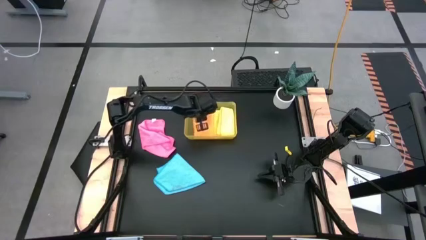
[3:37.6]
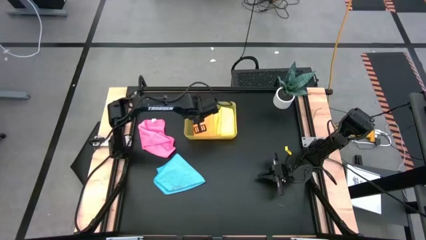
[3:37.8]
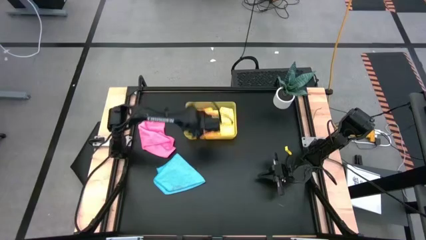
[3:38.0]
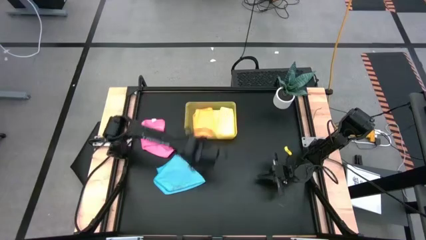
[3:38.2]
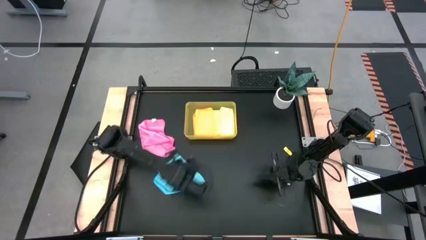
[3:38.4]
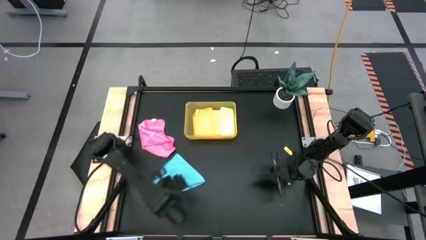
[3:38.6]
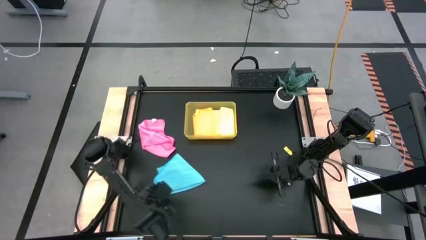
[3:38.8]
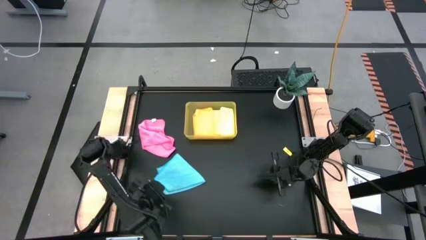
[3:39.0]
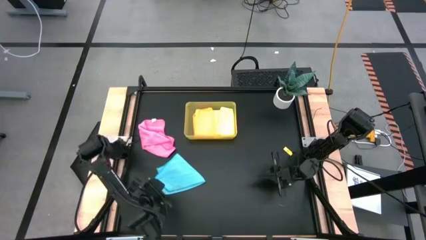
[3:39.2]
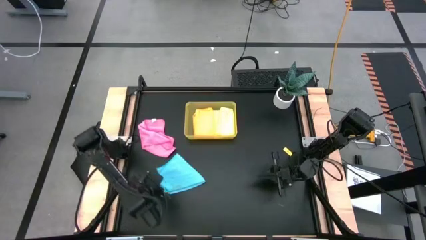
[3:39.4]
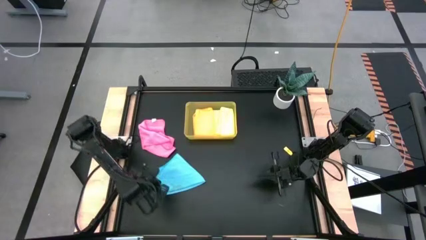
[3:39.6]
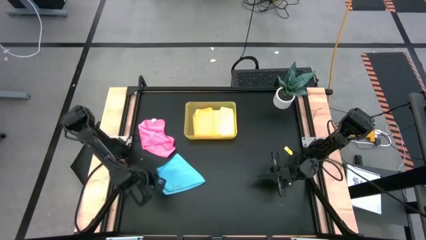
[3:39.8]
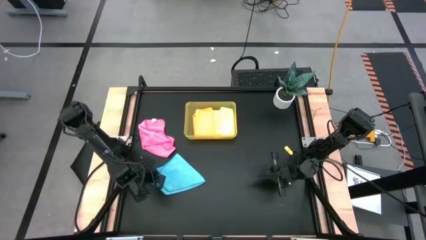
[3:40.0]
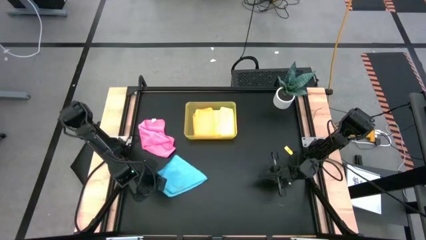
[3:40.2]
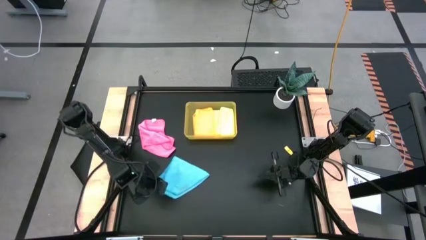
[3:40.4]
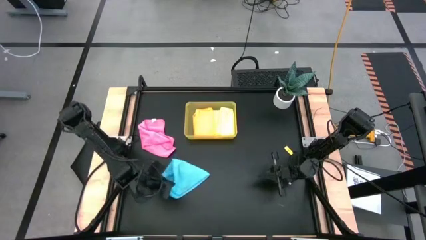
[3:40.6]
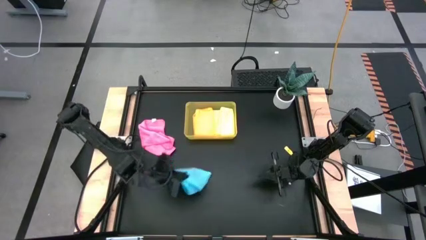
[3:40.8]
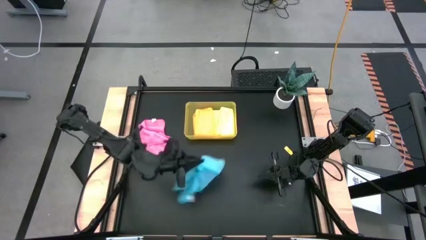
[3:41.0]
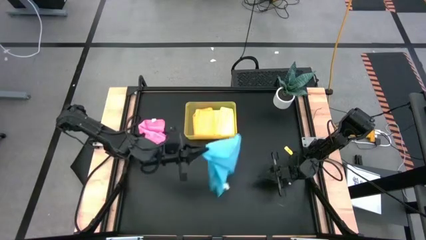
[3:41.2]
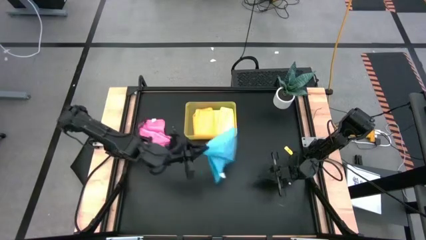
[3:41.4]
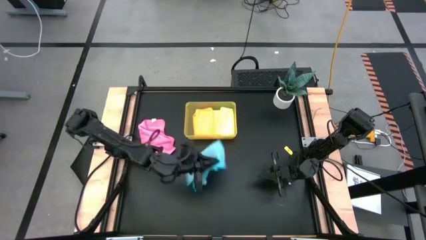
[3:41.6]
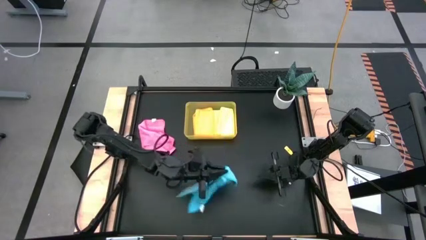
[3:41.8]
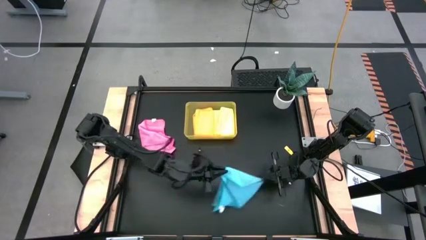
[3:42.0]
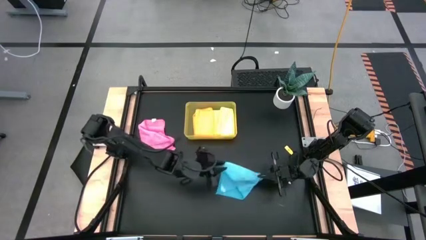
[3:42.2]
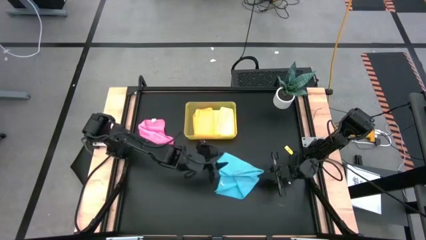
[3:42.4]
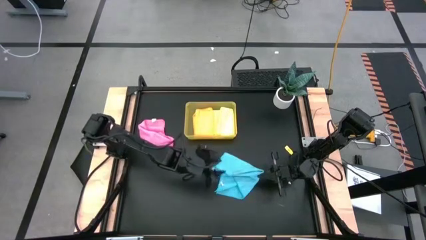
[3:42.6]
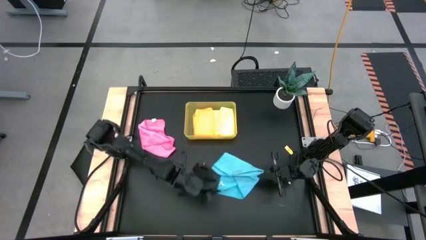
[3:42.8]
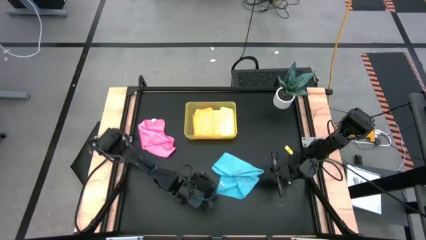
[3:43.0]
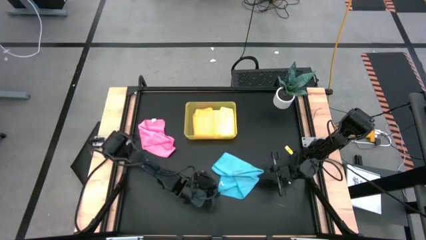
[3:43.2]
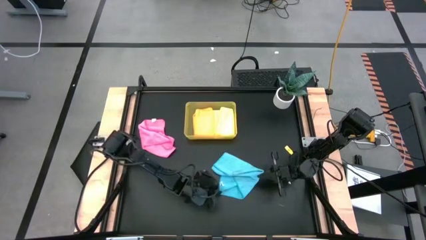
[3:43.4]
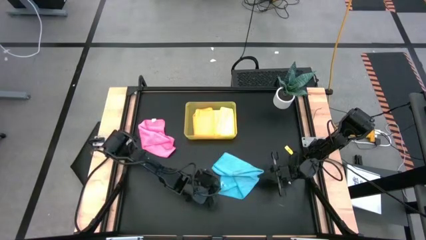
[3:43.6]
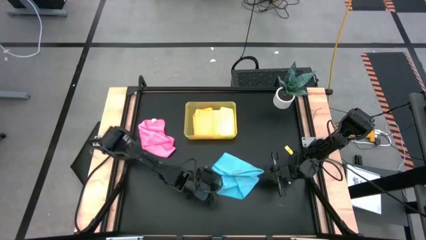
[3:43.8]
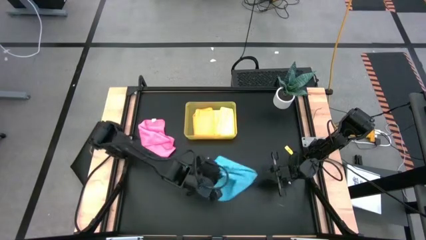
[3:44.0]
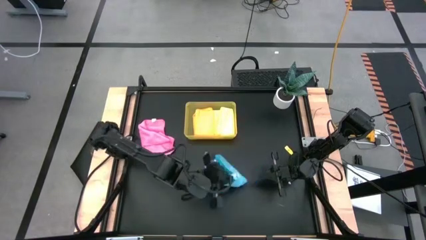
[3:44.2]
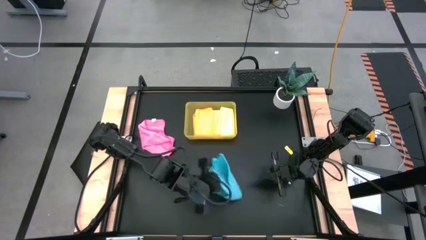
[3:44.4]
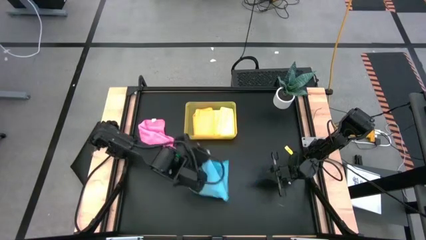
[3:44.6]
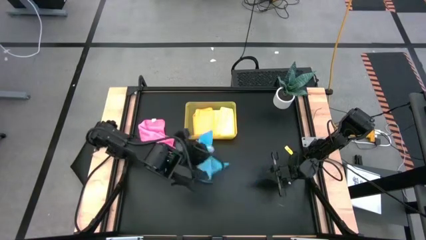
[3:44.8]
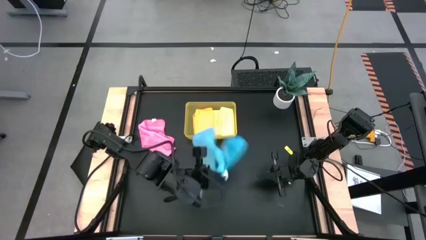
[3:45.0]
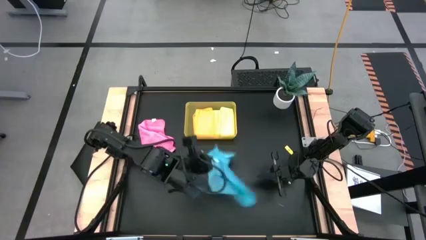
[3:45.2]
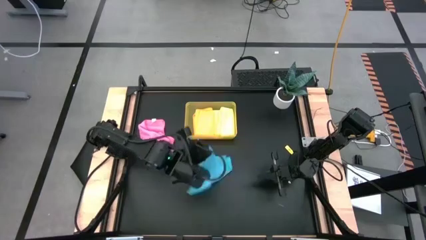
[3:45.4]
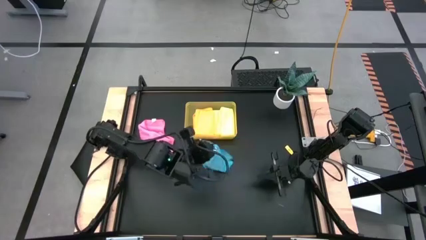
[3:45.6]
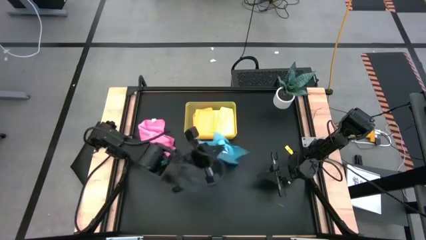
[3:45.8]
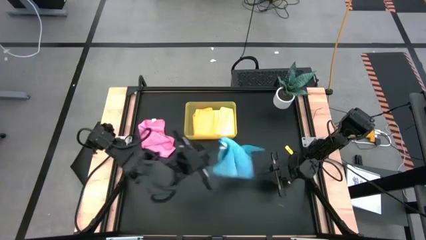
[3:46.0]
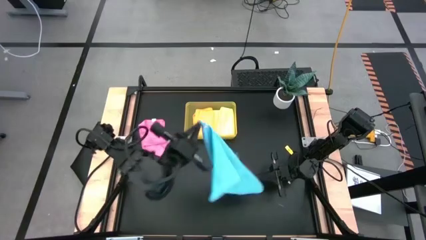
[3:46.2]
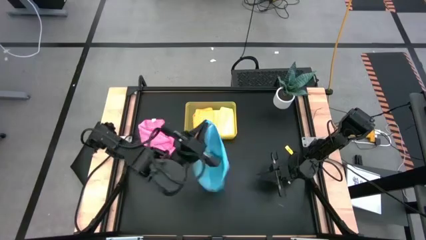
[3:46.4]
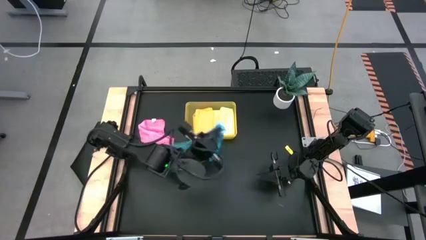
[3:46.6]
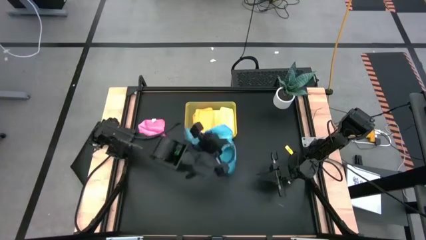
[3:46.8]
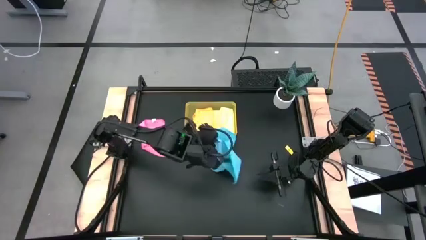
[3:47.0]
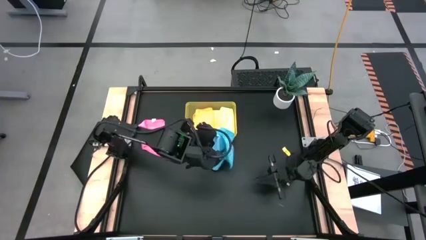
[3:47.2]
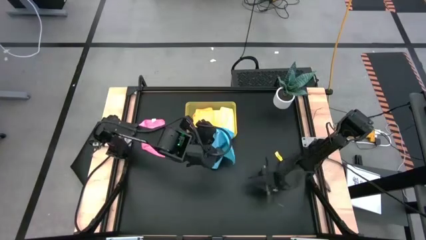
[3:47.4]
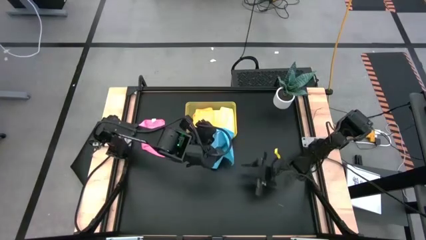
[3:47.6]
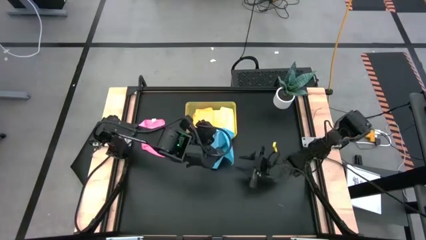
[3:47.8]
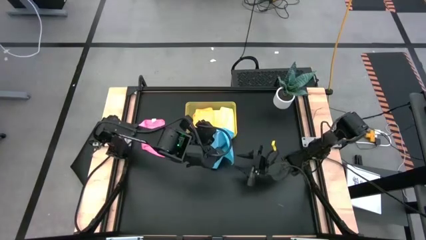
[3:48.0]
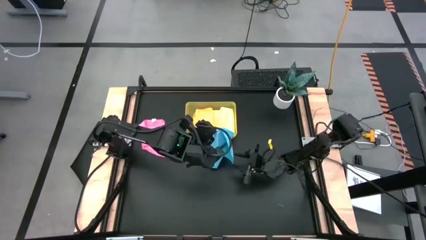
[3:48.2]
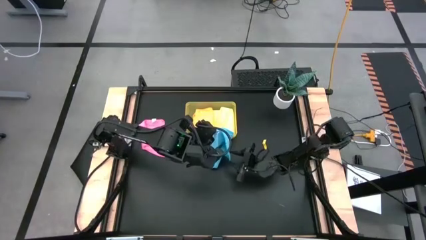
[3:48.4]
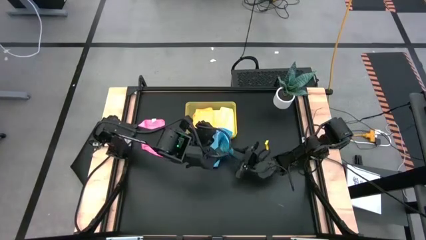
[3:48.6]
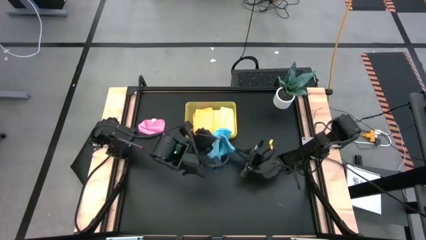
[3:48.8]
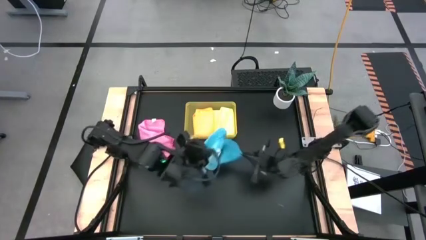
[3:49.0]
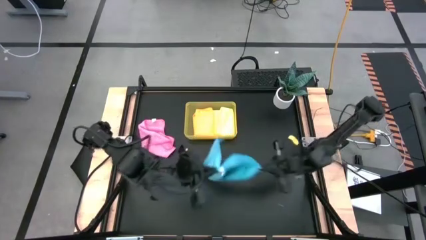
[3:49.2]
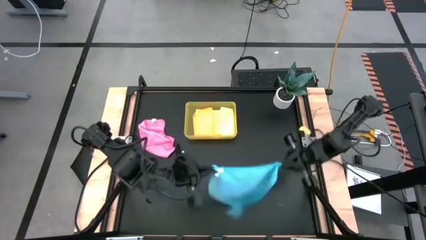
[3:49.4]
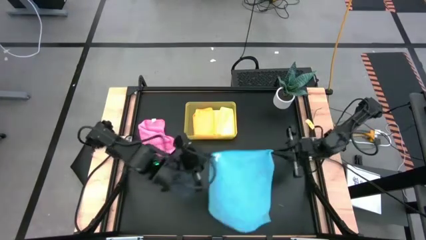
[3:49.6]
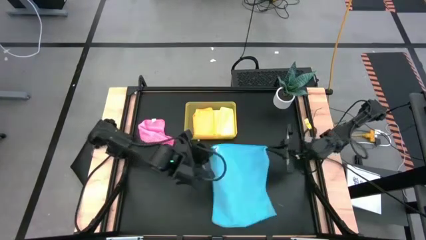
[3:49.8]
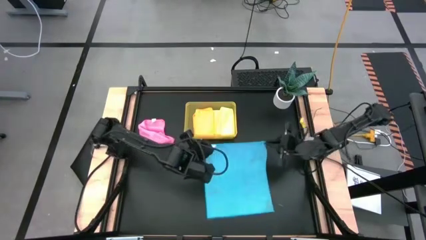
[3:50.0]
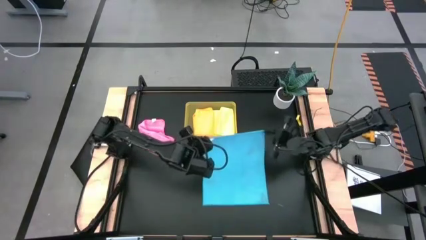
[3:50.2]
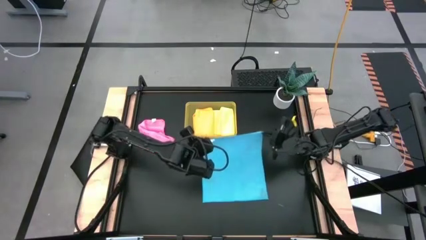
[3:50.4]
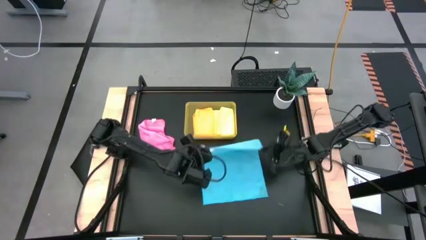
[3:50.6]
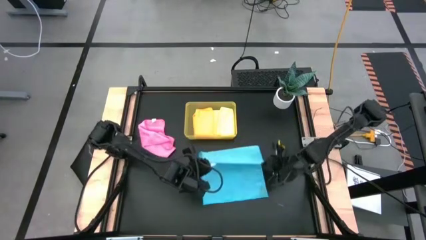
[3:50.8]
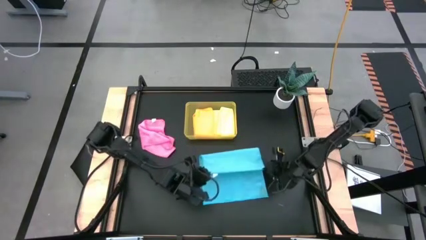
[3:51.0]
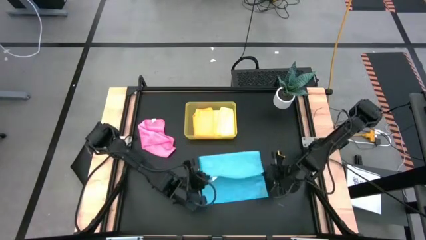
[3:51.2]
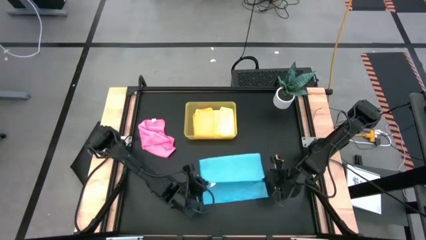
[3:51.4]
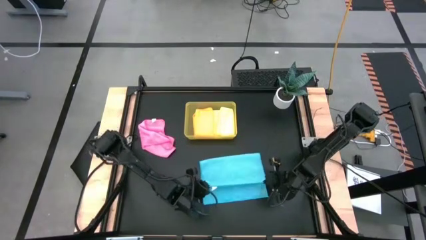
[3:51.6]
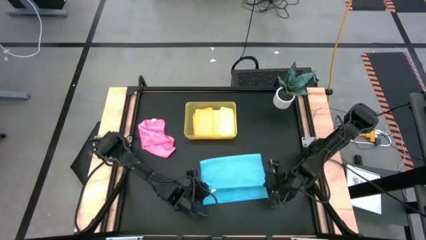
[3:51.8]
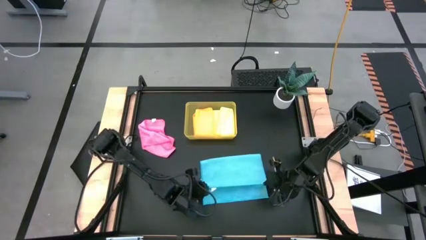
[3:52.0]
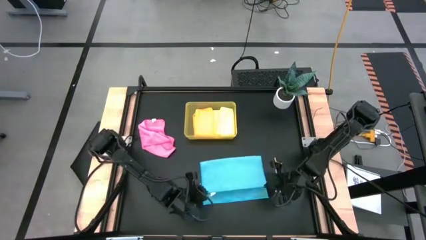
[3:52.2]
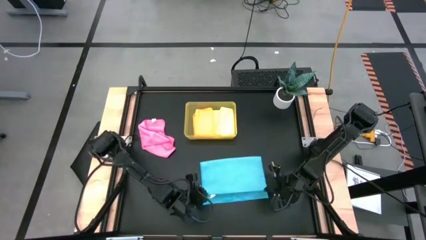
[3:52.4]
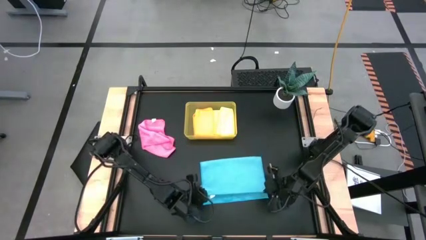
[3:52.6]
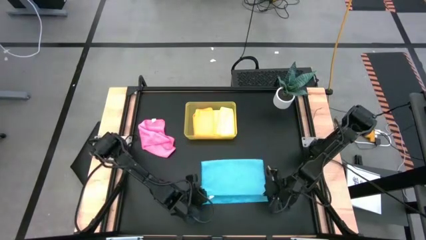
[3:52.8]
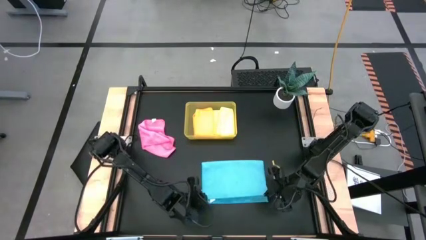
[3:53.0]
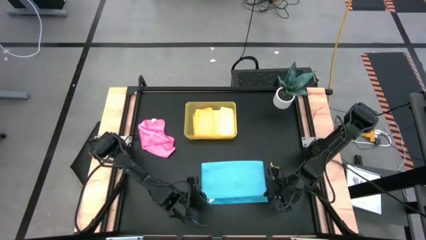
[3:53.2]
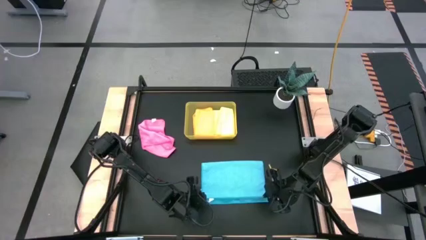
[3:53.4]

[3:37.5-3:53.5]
Task: Fold microfiber towels
Fold the blue microfiber cloth
